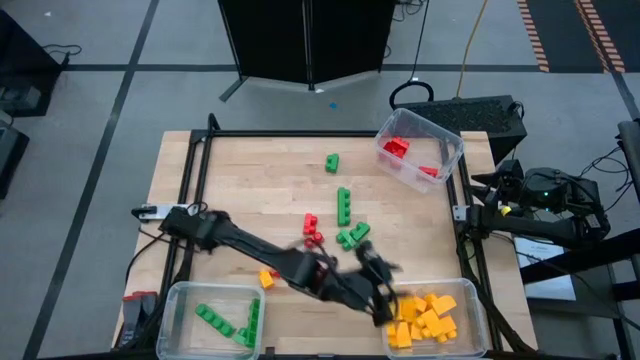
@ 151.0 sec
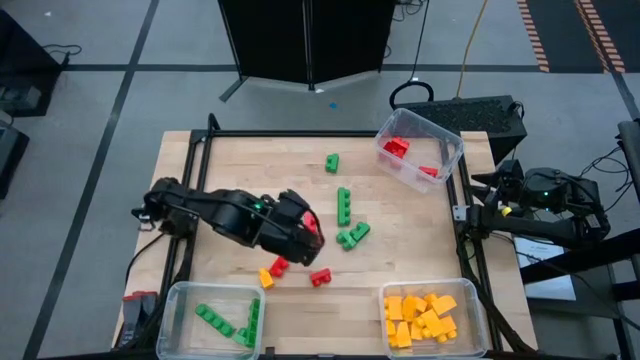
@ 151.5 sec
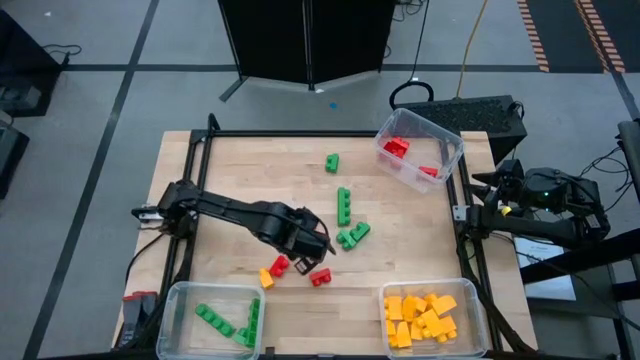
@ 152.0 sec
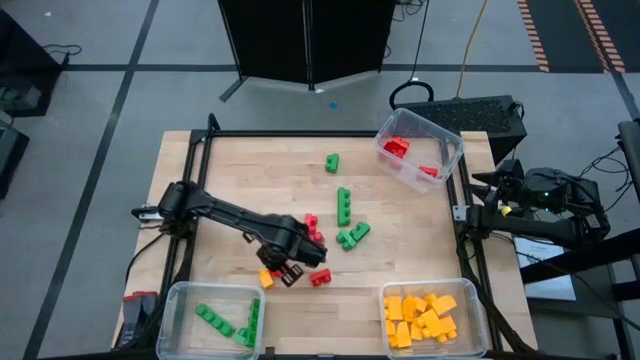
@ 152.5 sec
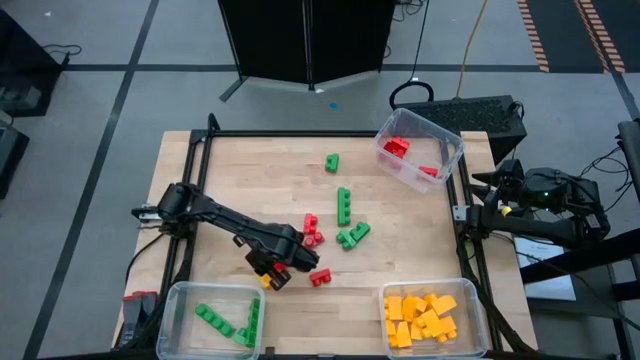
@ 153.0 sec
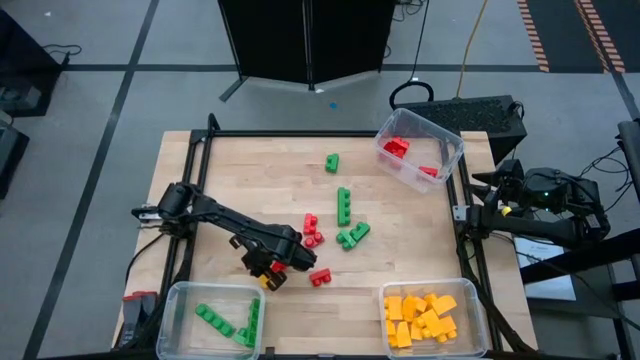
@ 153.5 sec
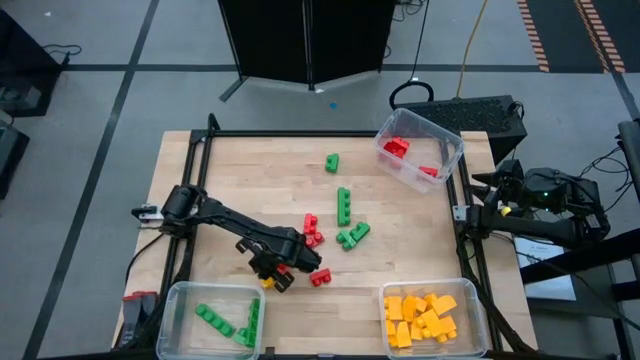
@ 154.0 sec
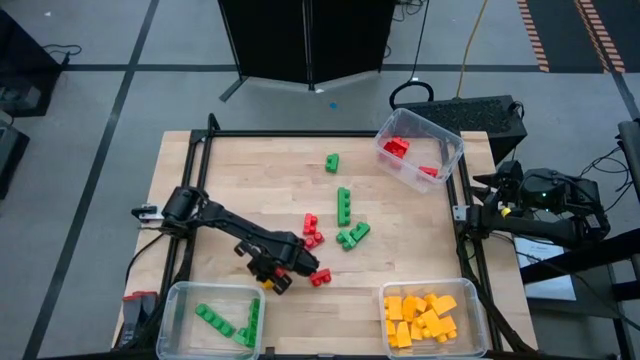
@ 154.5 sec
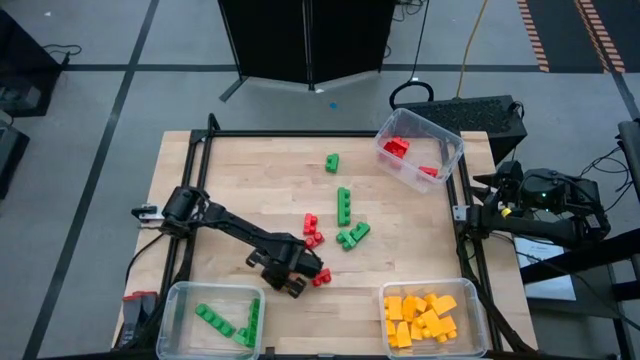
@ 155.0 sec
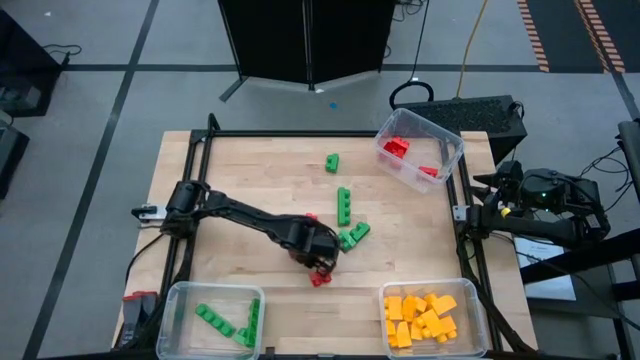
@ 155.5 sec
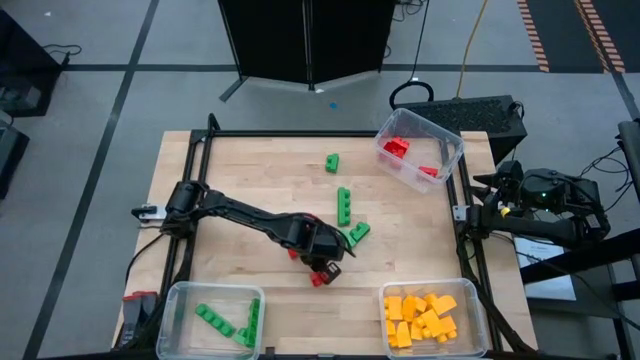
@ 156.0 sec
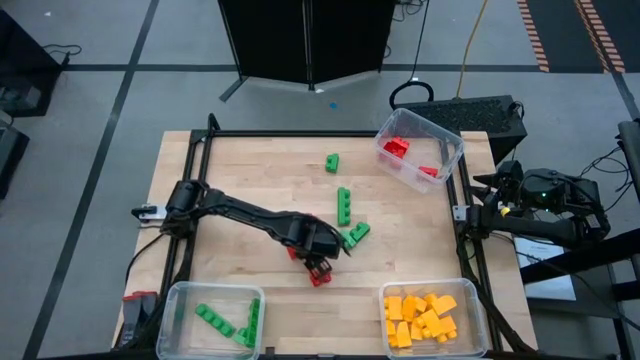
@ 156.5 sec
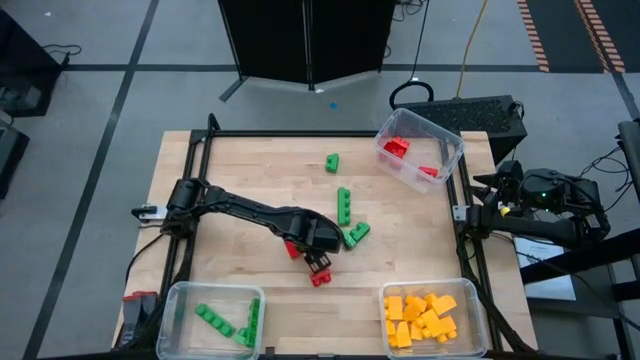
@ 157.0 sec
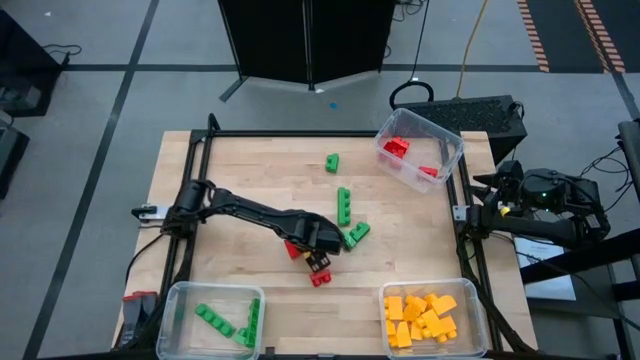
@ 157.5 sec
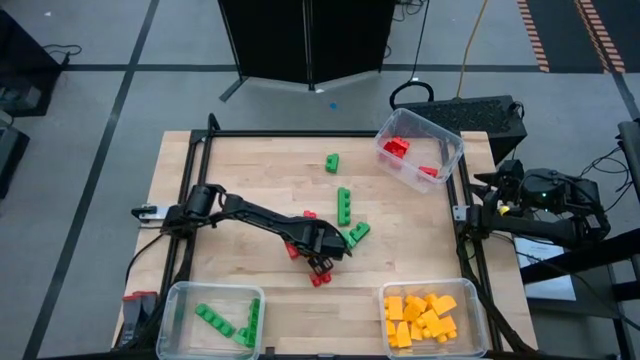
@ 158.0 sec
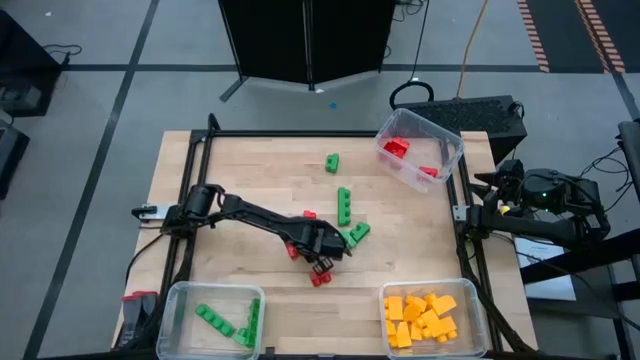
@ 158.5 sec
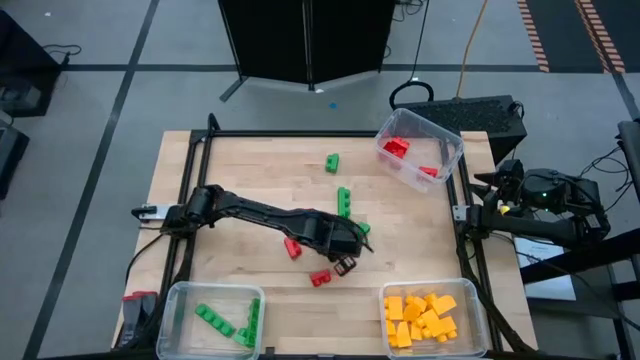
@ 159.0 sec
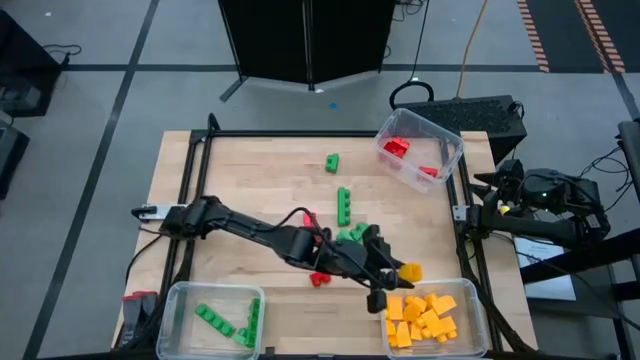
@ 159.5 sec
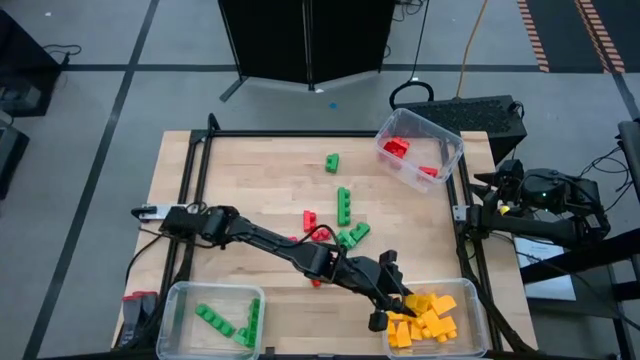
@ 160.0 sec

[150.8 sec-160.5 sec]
Task: Sort blocks
Put the yellow game piece into the bottom right transparent bin

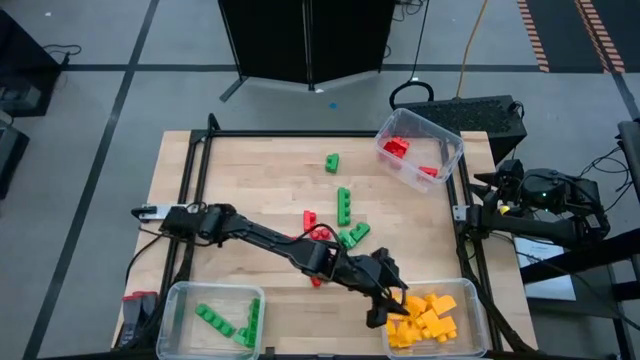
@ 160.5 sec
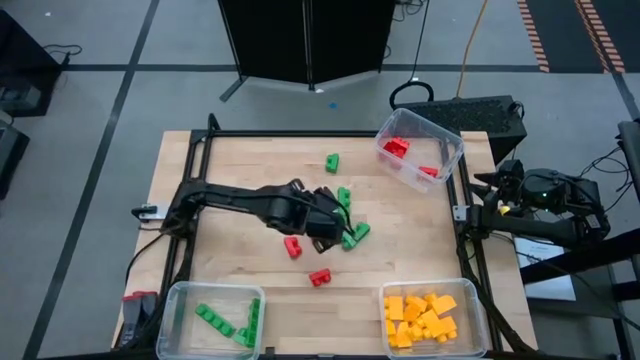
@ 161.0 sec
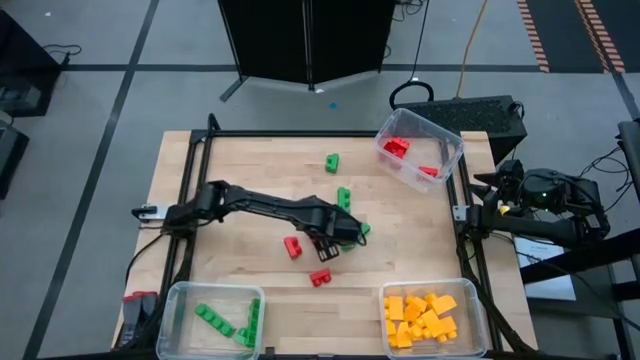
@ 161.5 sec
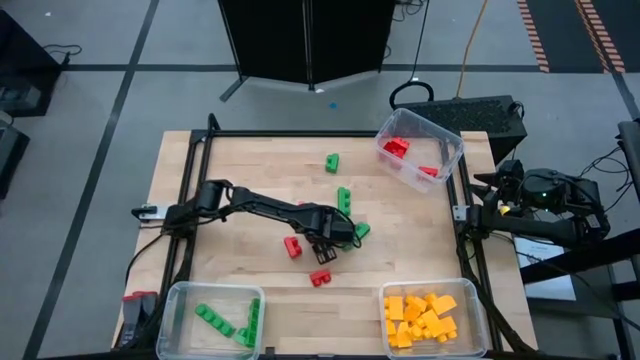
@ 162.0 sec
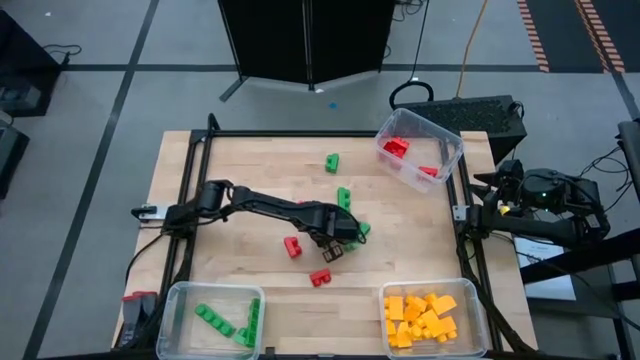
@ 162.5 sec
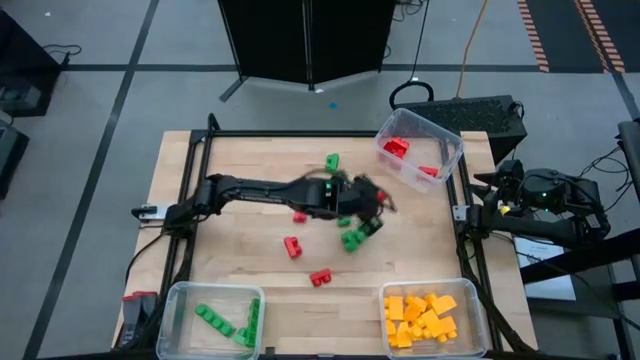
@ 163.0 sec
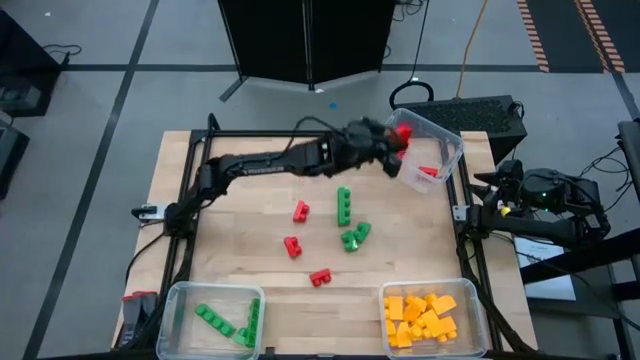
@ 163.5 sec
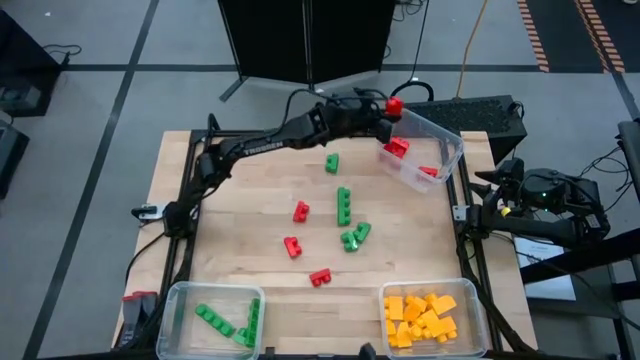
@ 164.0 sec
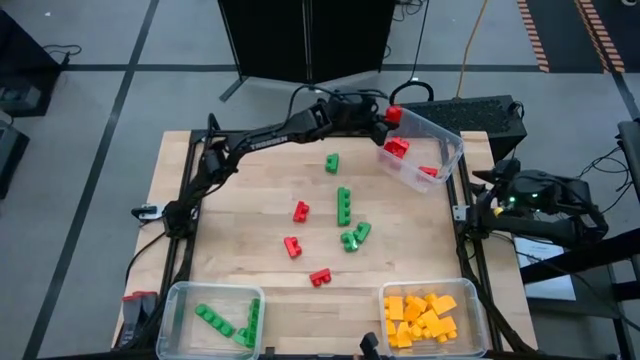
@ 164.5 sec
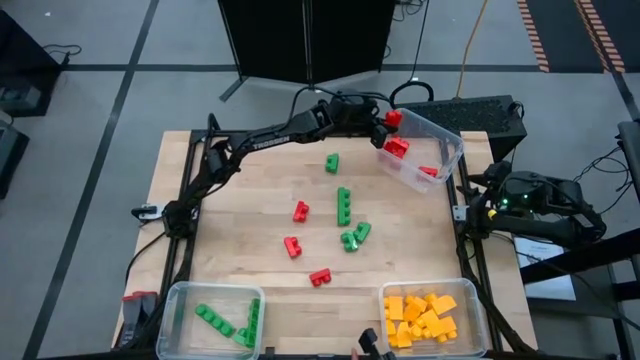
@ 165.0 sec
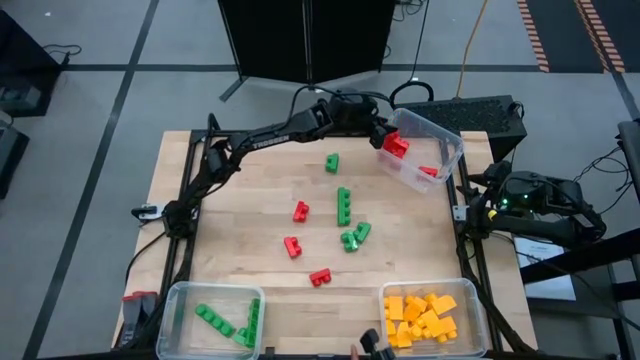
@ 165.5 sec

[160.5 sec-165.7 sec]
Put the red game piece into the top transparent bin

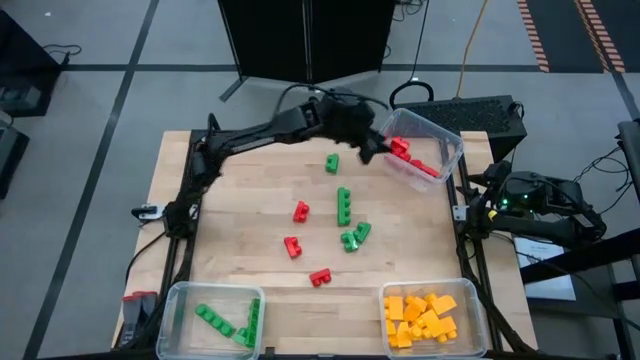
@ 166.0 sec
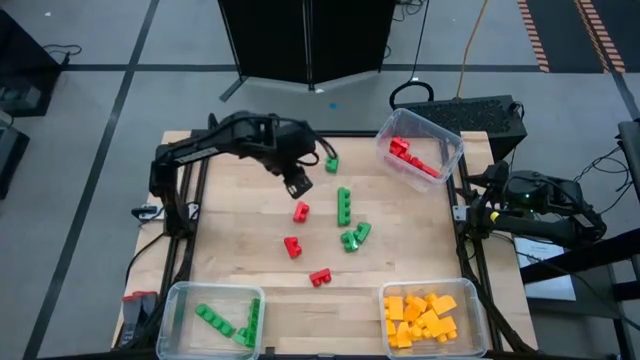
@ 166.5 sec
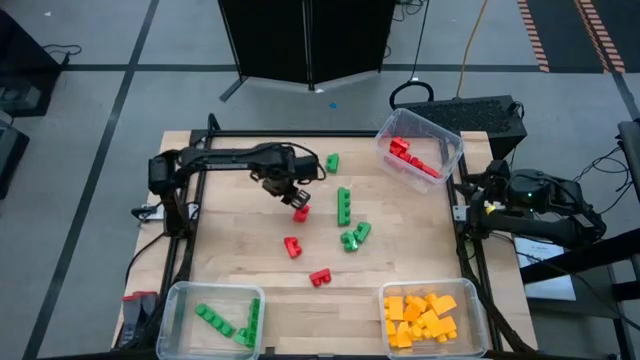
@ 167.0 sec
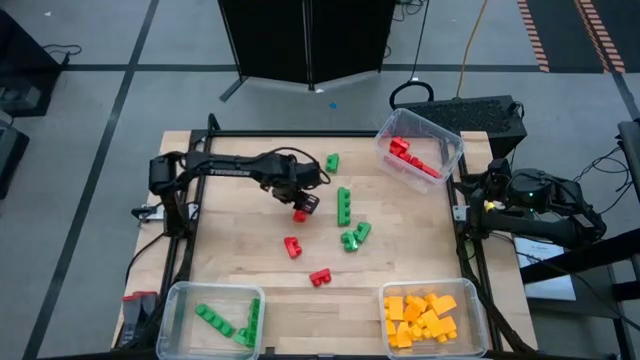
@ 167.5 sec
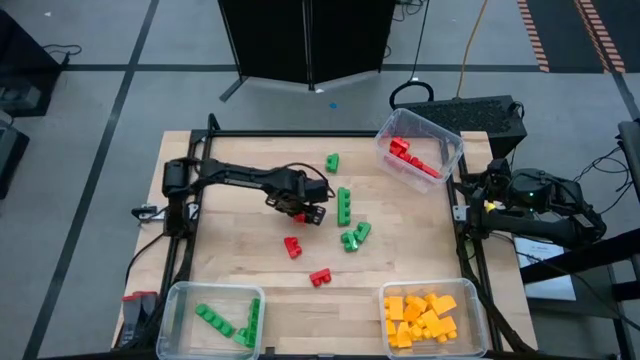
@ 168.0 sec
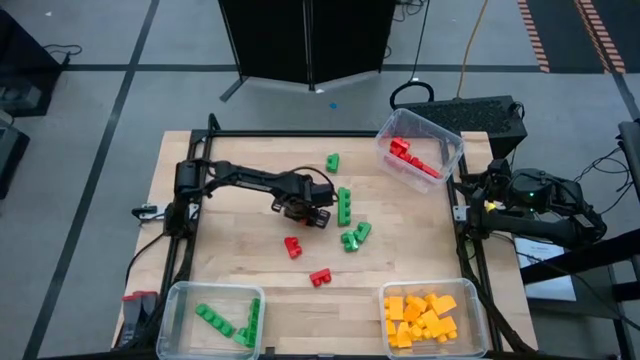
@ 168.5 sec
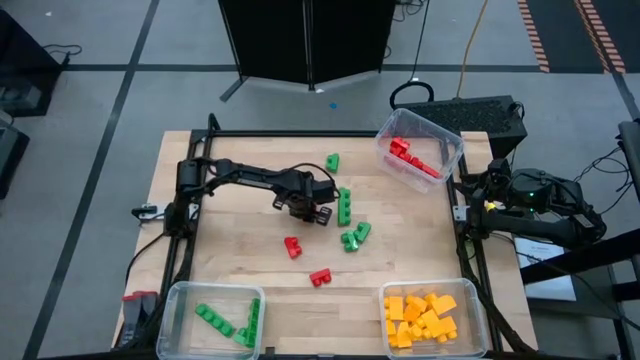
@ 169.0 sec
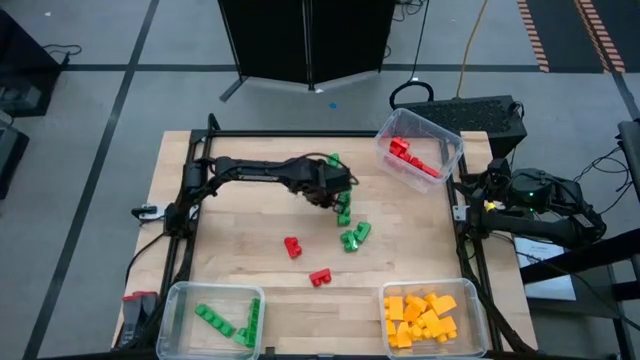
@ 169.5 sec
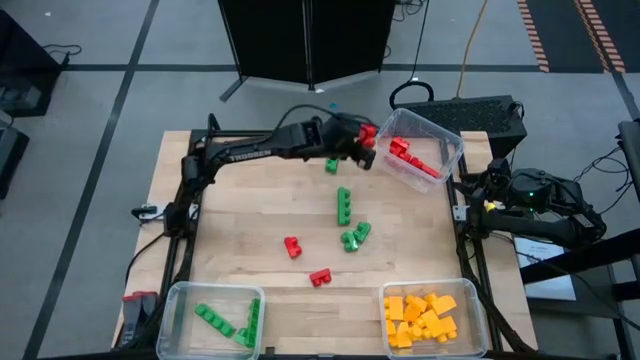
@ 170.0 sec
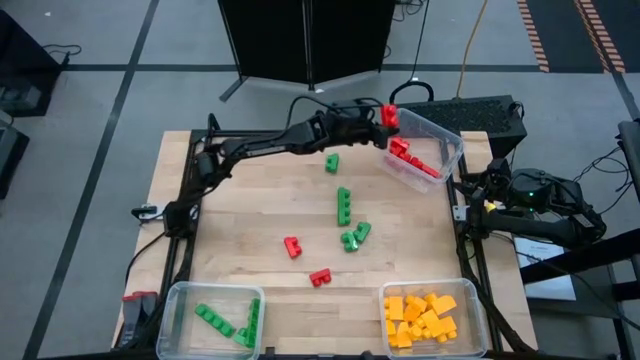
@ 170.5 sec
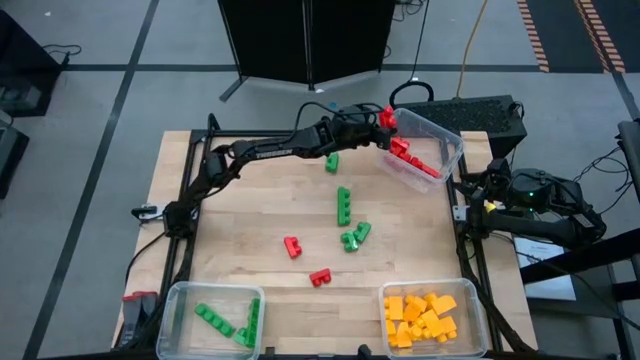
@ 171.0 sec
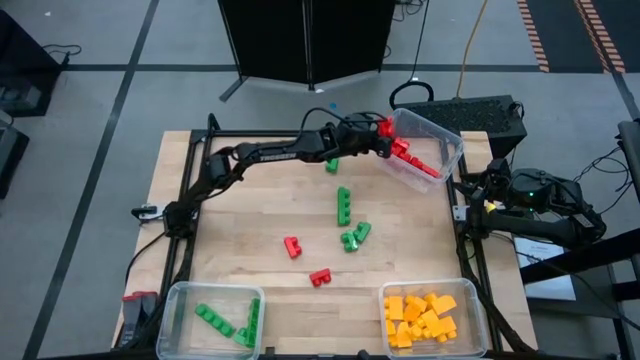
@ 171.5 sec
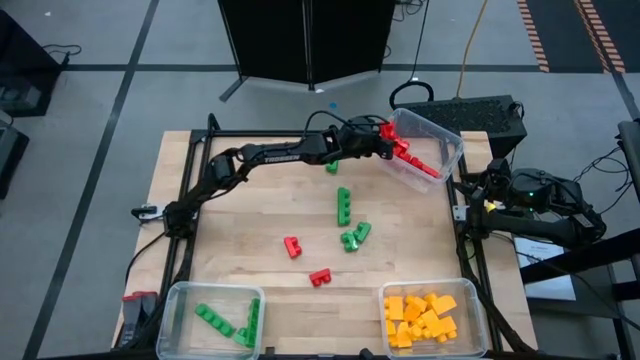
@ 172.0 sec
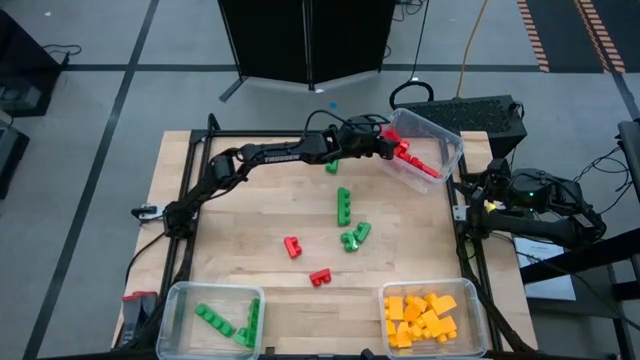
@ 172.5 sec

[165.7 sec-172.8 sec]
Put the red game piece into the top transparent bin
